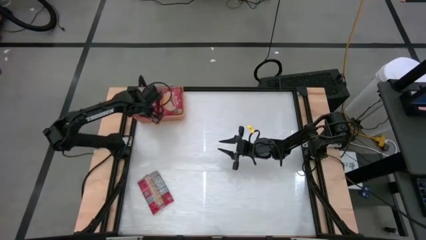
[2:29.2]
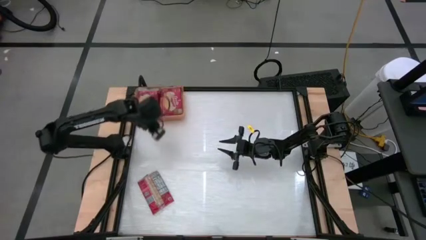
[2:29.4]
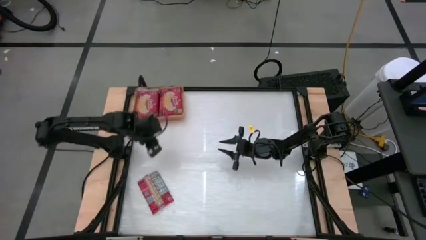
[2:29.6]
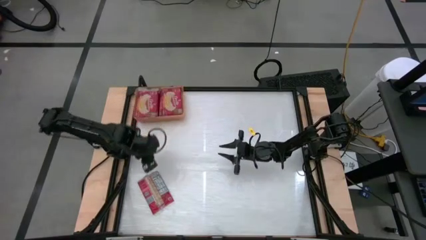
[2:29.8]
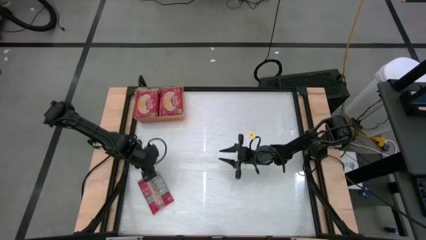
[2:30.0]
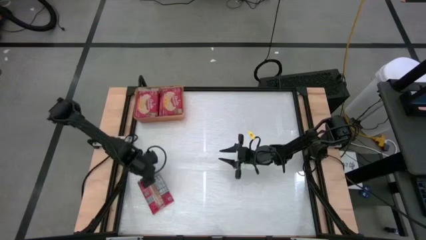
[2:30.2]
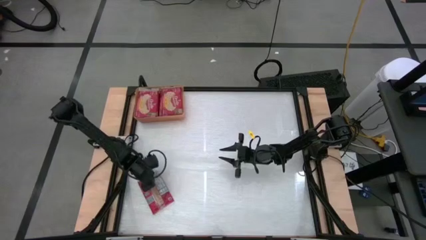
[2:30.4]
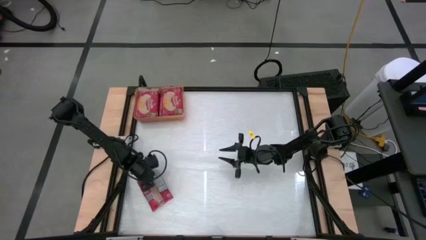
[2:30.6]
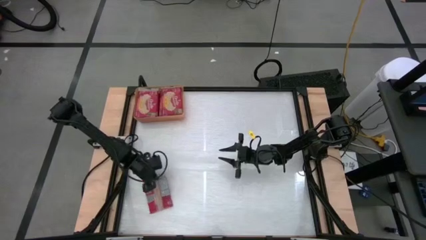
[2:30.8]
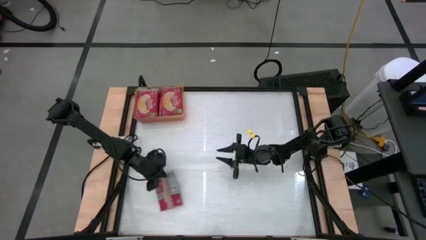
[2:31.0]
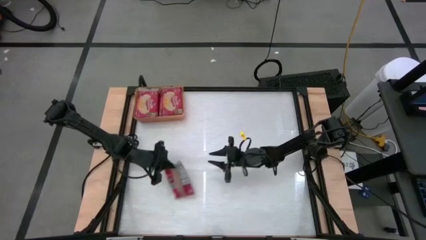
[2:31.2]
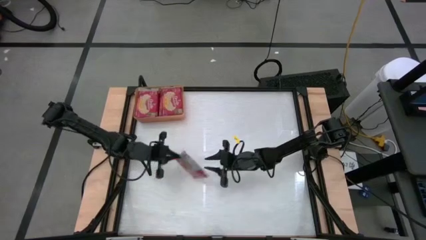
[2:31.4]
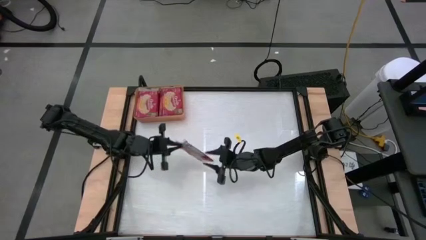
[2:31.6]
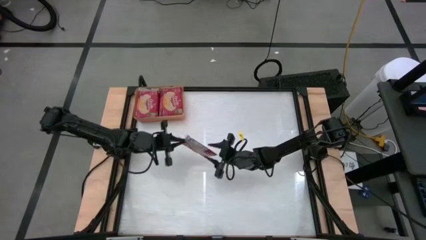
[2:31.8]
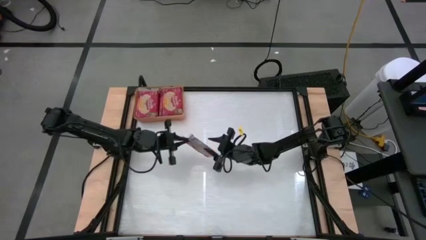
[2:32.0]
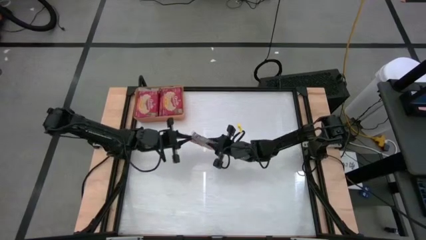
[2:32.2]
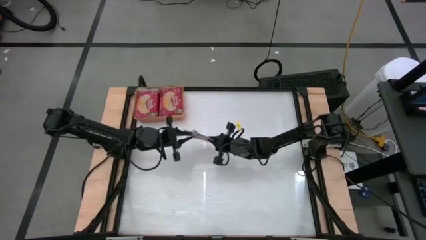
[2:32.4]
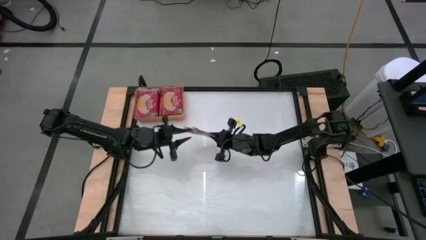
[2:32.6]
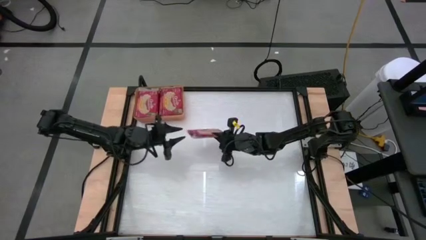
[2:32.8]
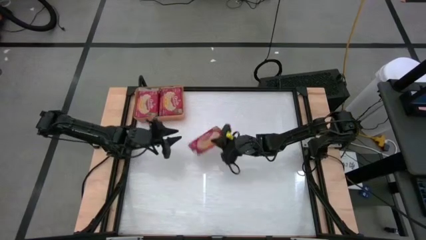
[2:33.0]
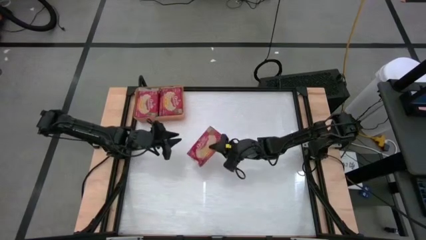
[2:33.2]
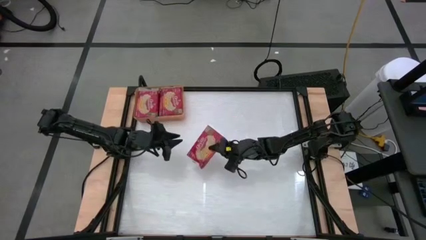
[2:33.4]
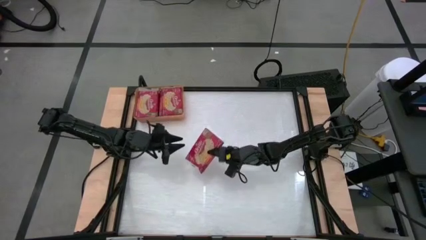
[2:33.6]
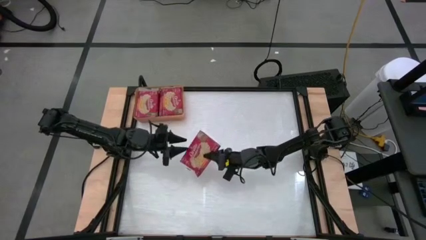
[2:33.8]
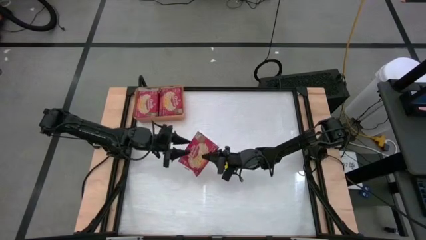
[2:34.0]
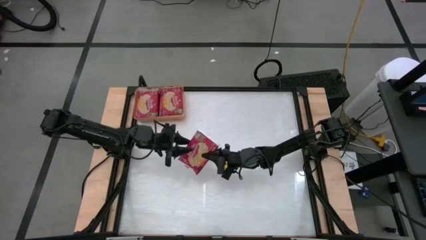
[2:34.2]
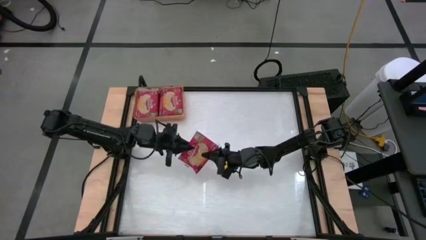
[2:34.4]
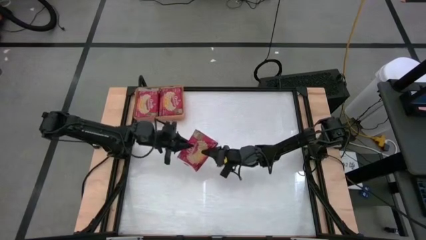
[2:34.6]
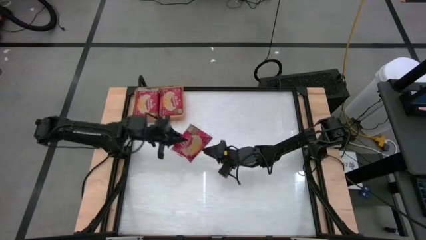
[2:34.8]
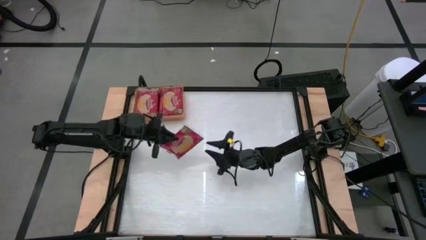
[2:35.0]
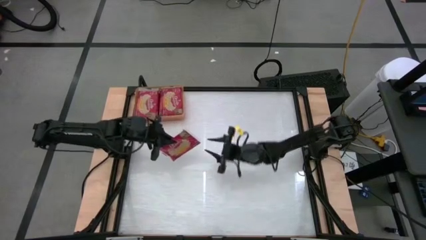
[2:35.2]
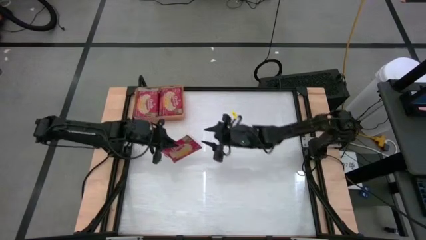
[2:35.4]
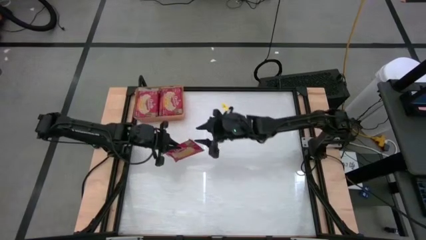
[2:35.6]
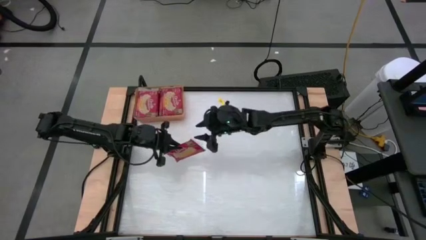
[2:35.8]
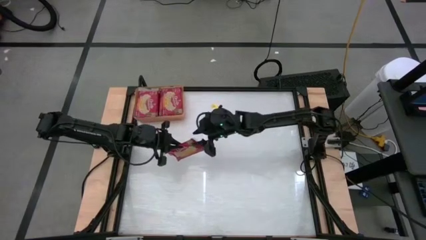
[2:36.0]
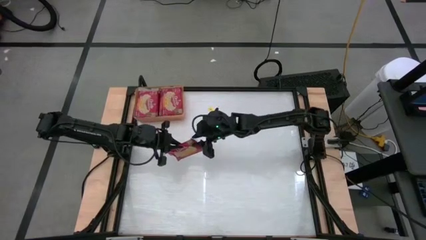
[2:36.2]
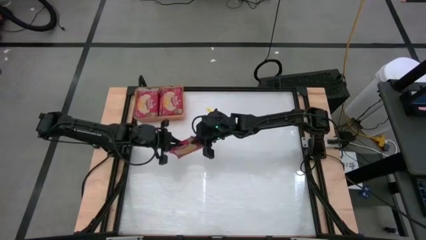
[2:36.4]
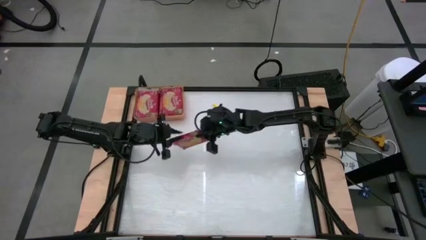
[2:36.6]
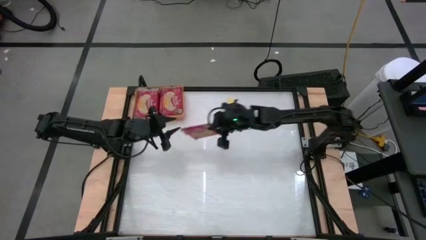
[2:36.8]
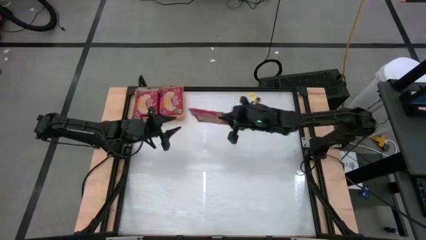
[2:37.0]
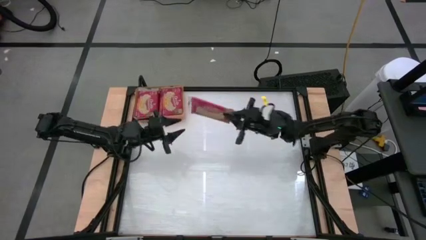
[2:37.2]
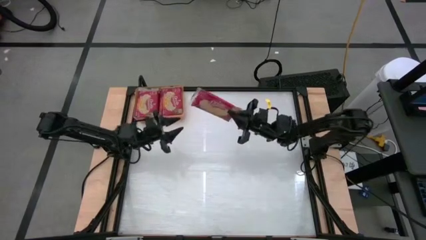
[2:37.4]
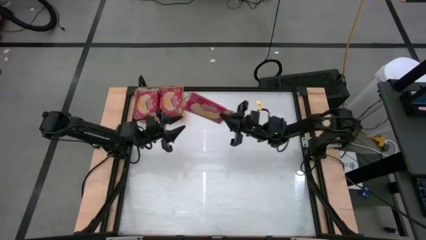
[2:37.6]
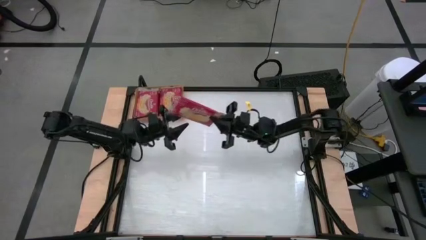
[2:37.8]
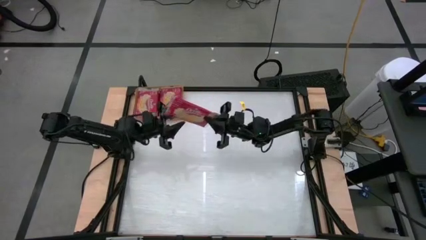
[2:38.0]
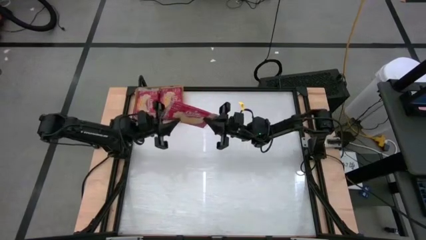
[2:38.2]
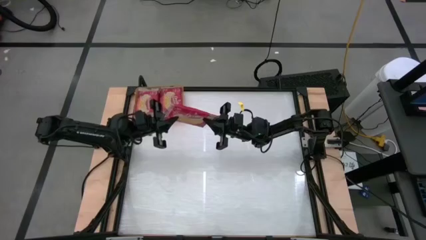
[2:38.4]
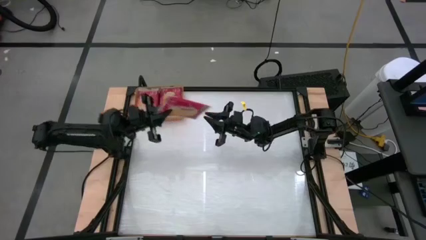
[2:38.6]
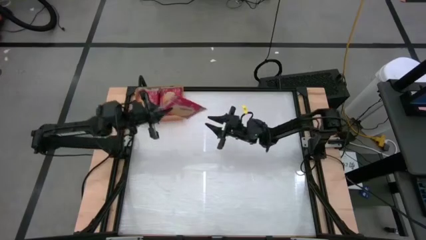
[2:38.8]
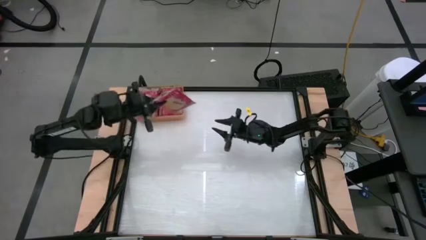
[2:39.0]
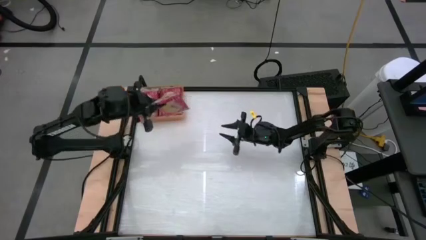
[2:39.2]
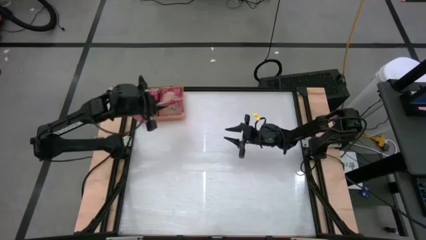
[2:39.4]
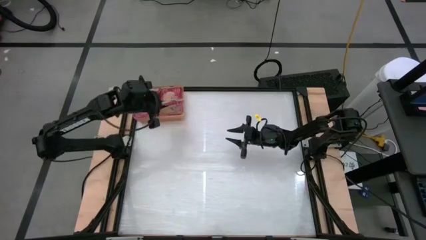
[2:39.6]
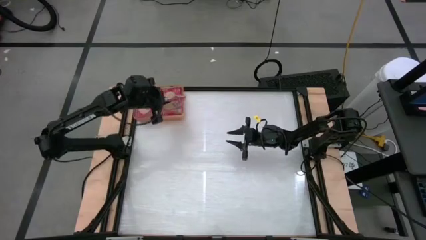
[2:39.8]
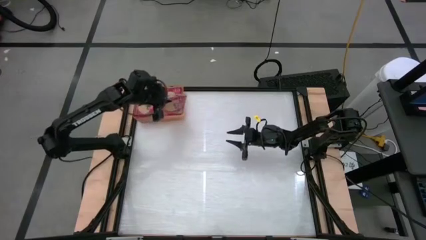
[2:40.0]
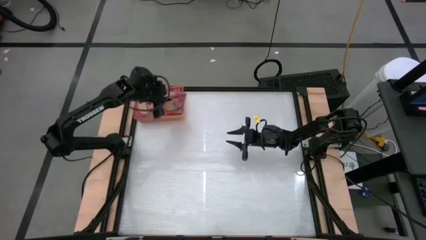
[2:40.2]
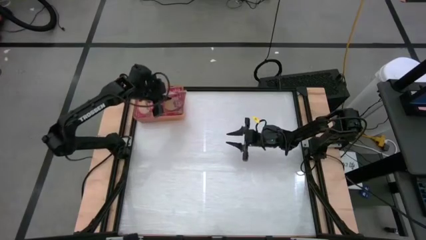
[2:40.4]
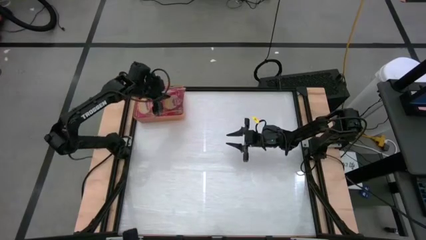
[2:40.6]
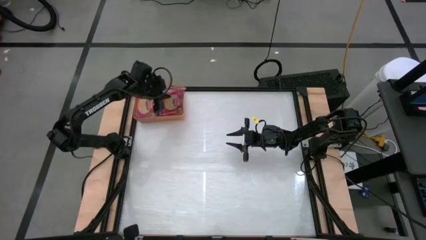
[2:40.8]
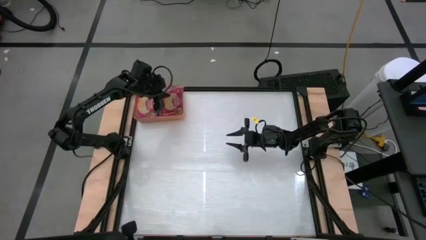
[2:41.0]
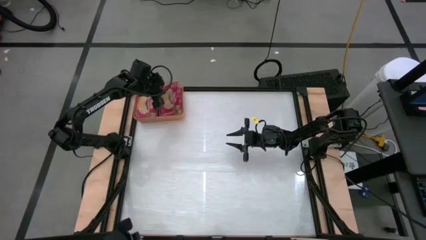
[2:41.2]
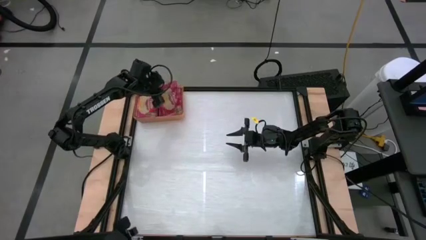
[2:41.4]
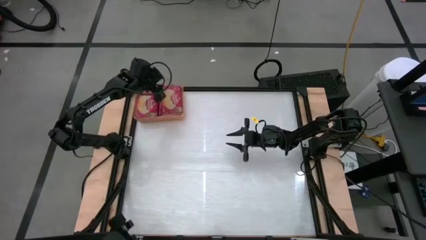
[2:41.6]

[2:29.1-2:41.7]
Task: Sort popcorn bags into baskets
Put the red popcorn bag into the orange bin

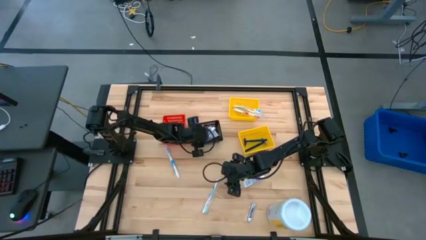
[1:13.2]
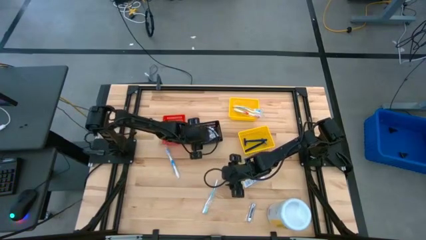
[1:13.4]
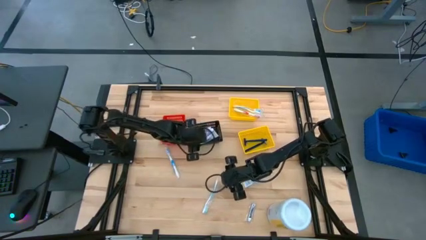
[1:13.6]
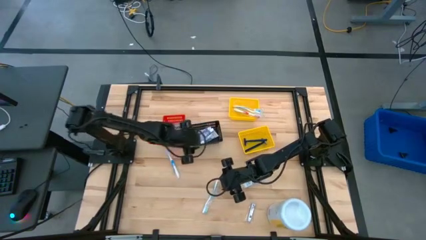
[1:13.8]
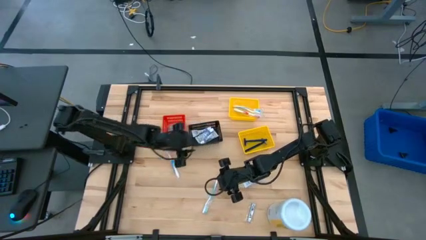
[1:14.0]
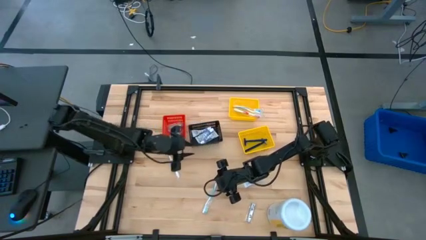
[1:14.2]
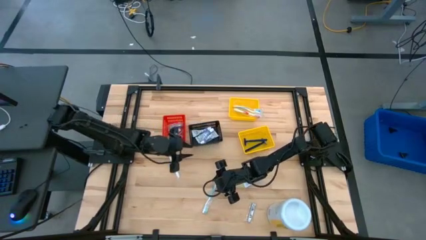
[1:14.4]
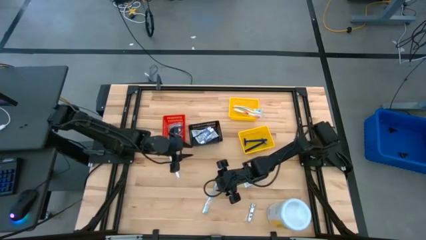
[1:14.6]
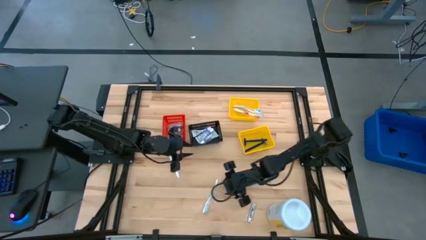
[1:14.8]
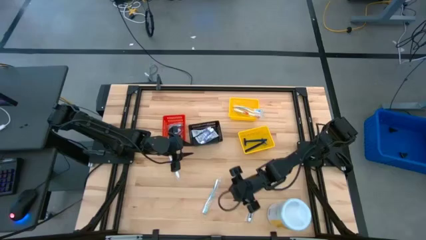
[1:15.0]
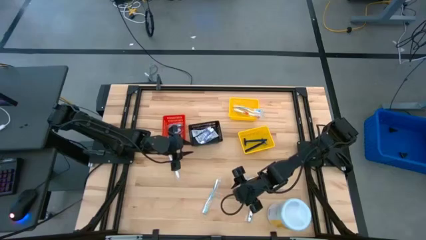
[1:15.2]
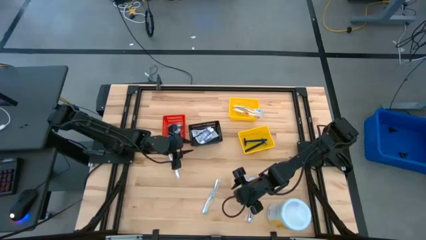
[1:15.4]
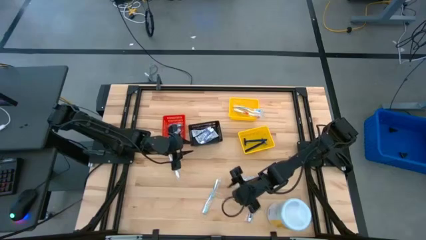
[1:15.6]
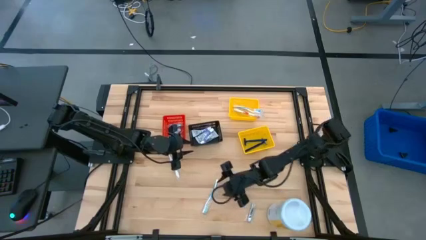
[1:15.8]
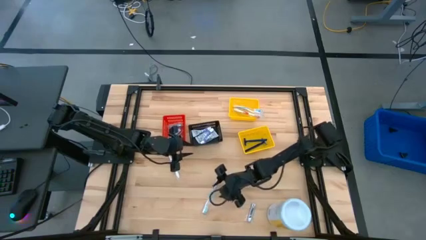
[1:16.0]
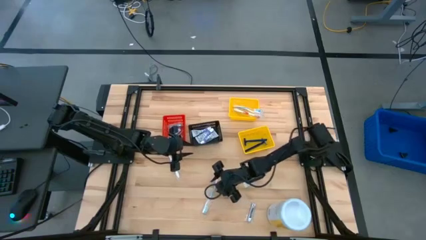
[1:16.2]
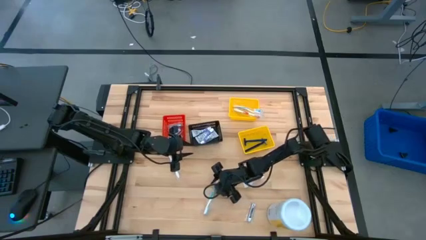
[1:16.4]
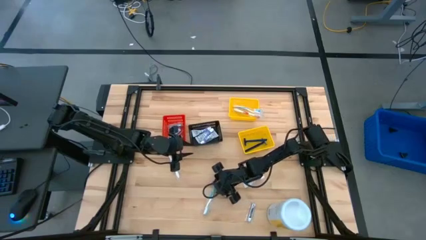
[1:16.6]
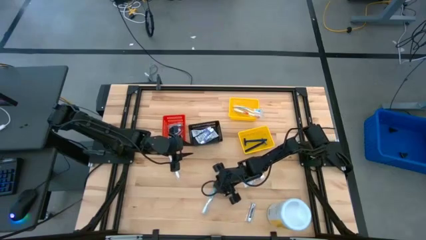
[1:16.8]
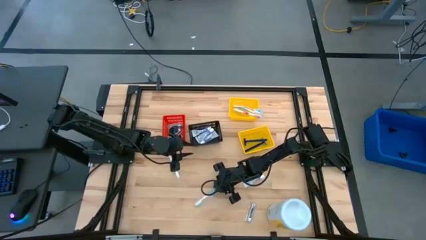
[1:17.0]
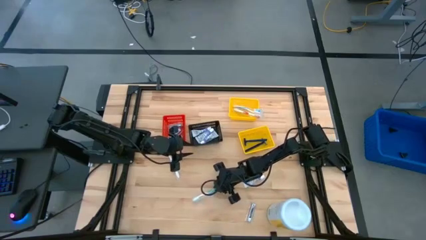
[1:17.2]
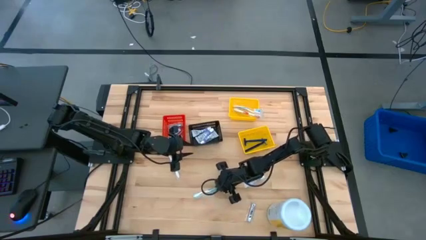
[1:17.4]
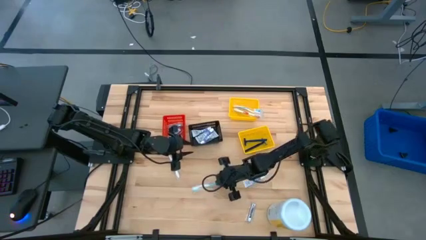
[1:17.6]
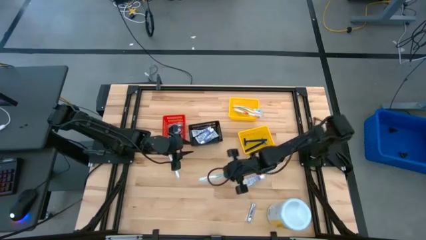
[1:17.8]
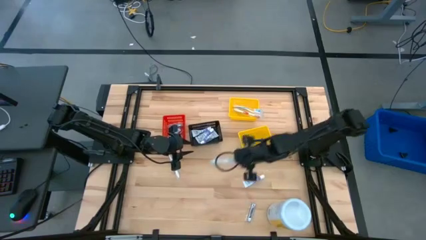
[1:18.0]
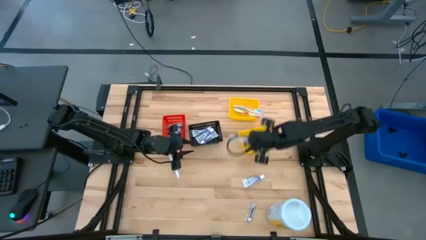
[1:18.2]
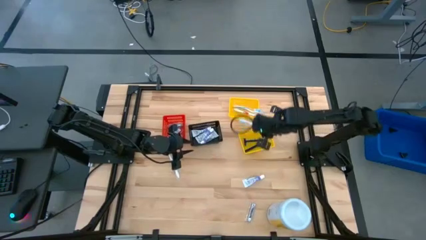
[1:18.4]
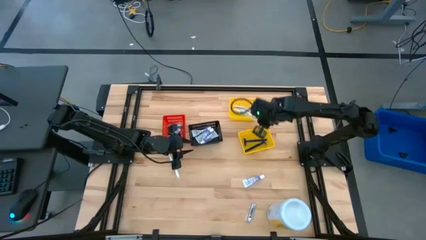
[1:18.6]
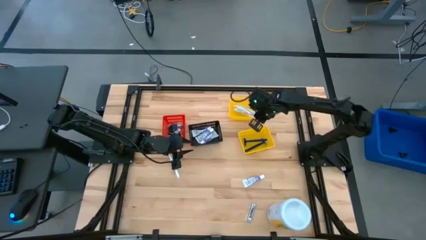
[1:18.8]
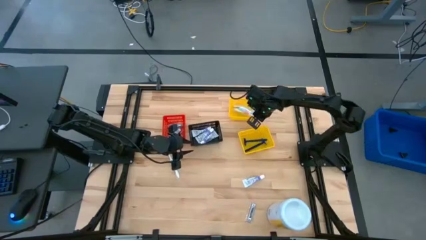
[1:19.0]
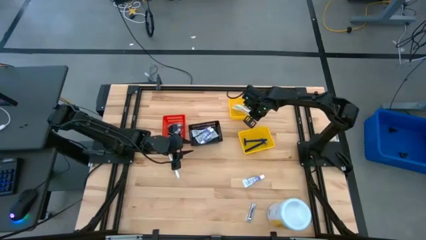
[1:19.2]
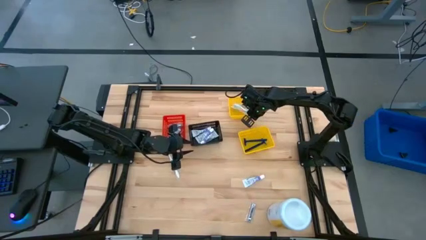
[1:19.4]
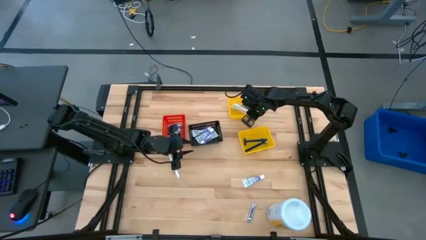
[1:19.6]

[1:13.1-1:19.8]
Task: Pick & Place Travel size toiletries
Put the green toothbrush into the top yellow bin
